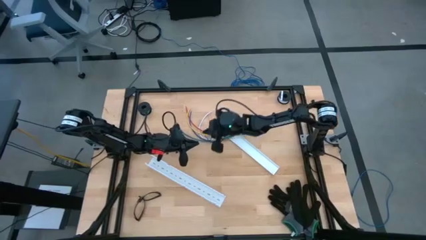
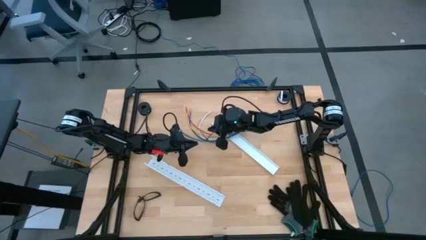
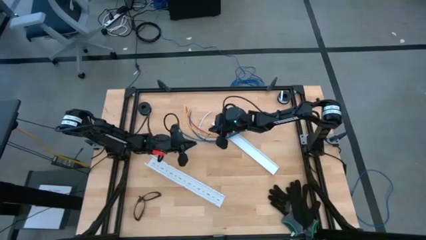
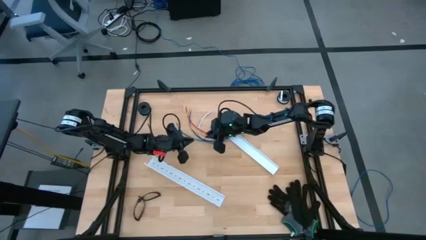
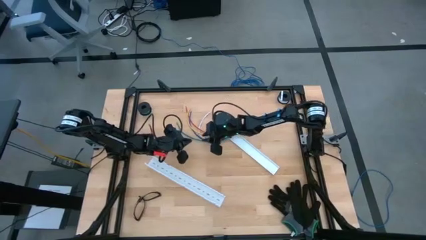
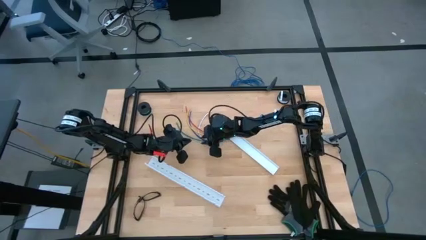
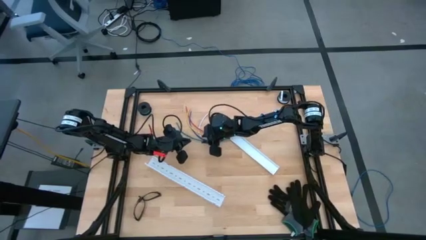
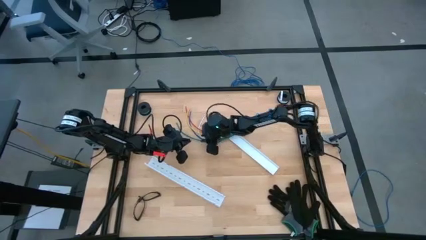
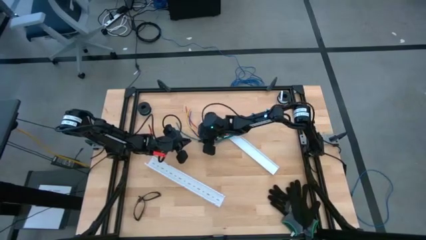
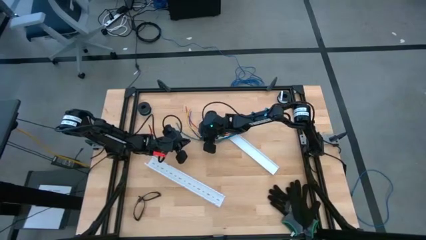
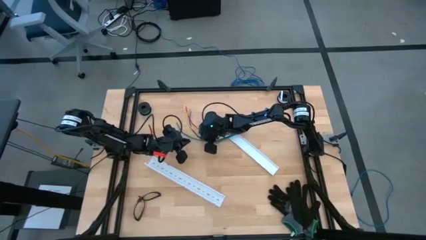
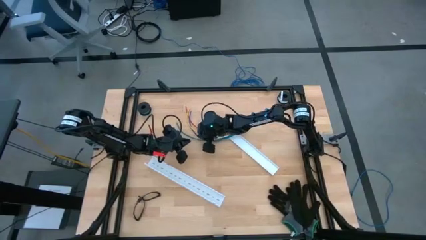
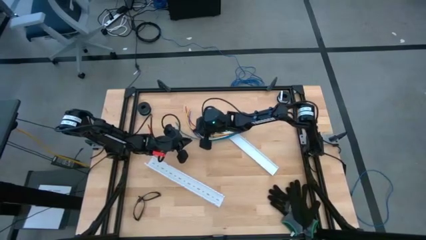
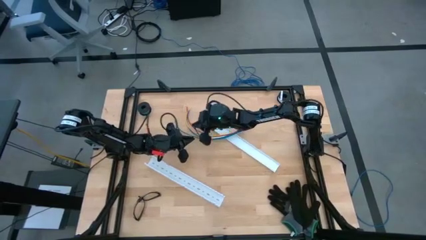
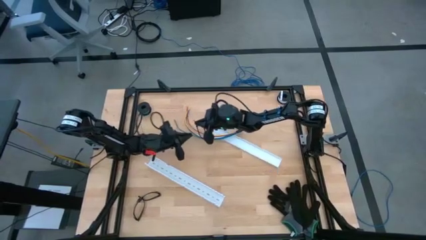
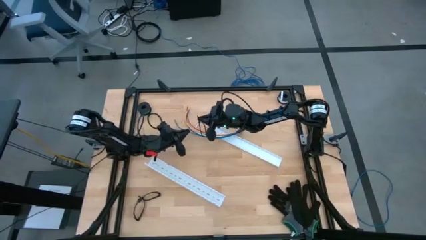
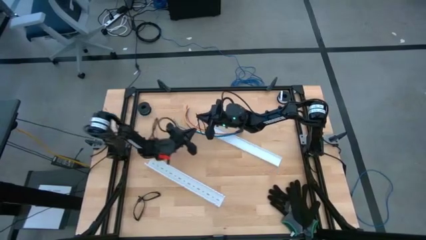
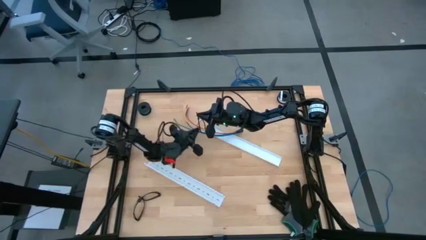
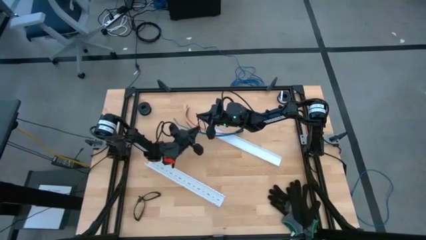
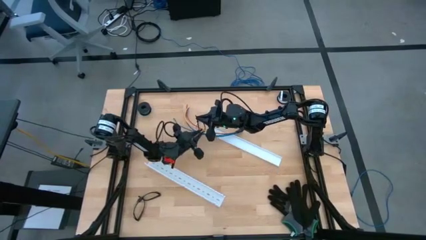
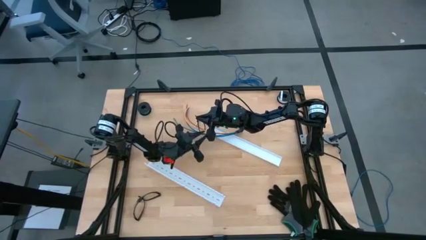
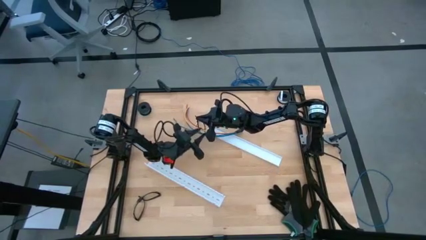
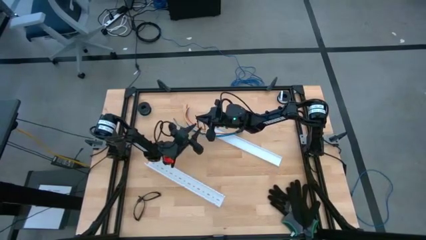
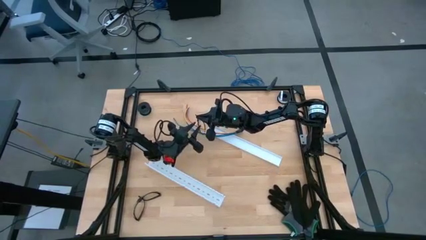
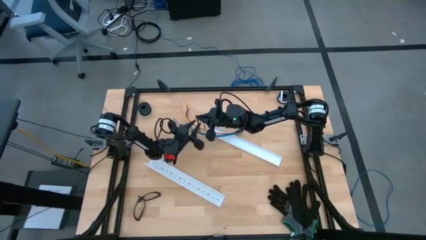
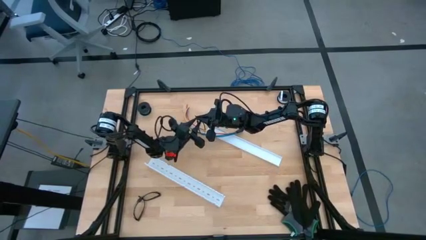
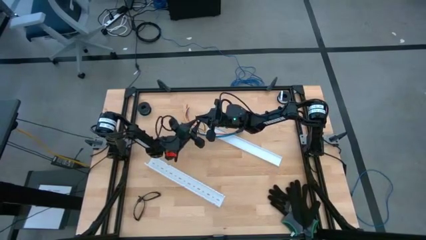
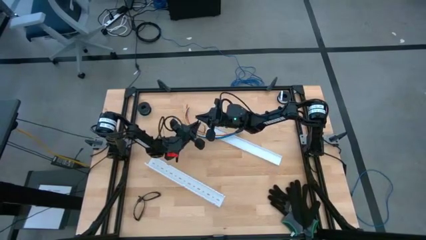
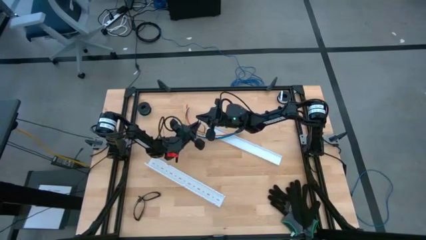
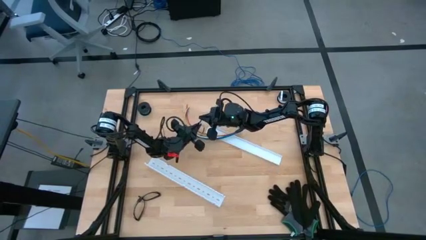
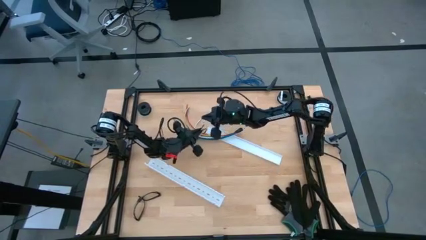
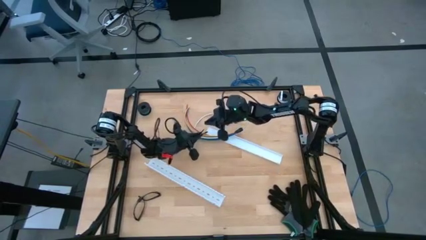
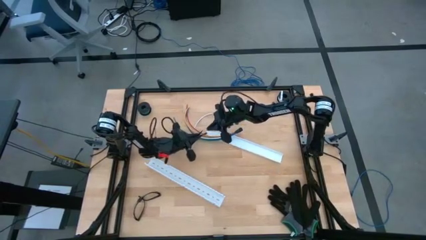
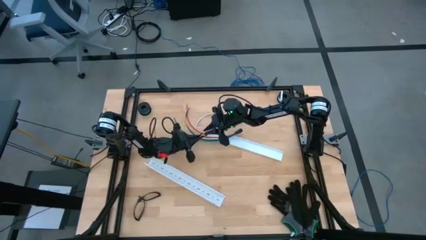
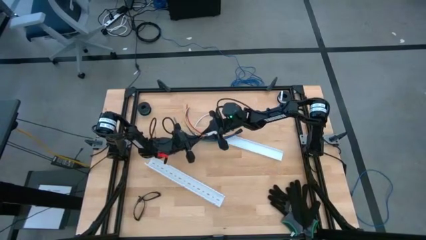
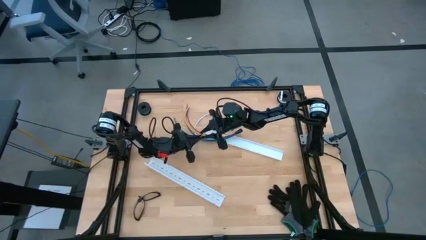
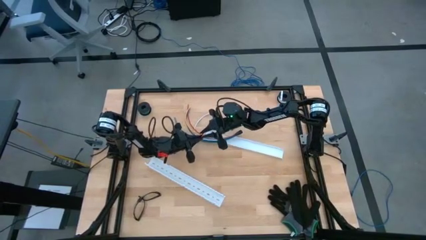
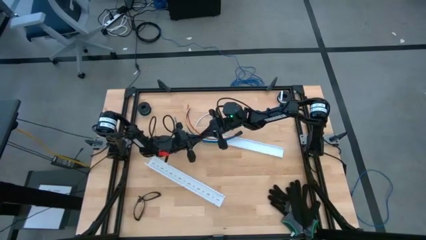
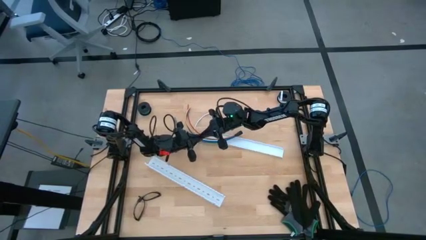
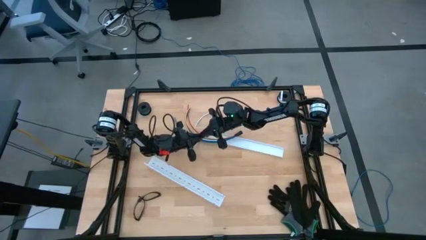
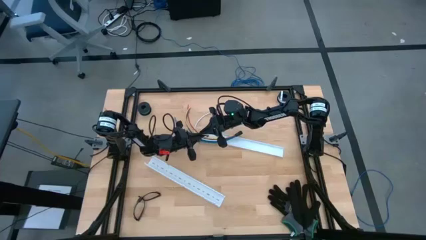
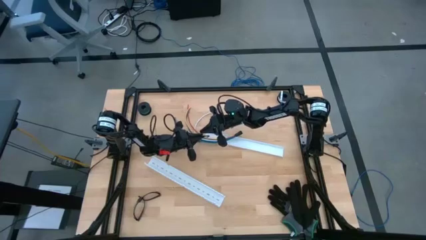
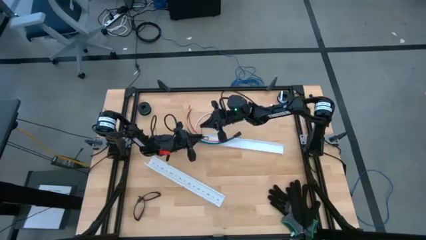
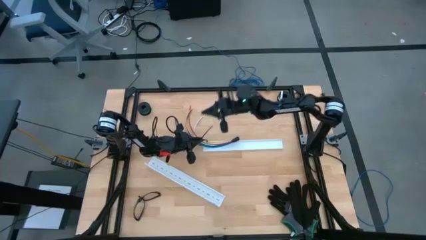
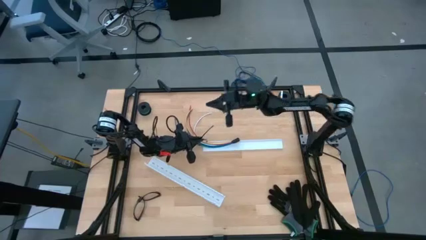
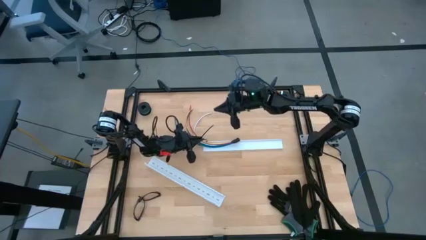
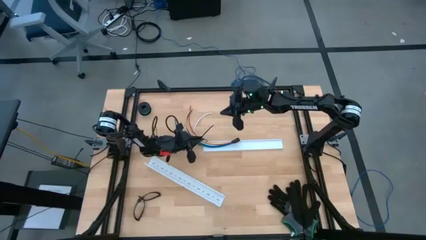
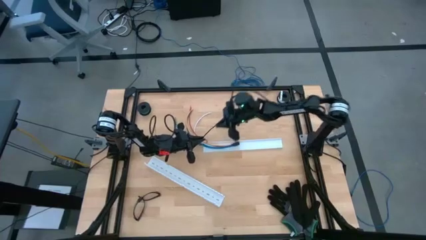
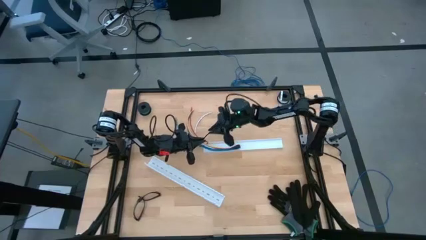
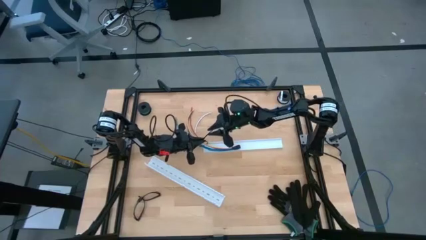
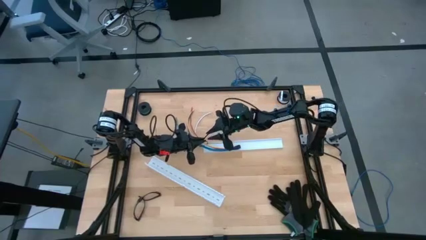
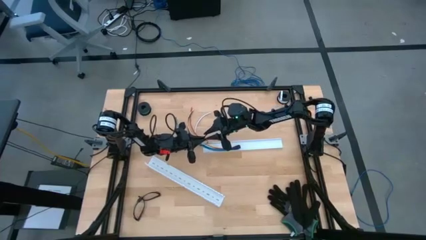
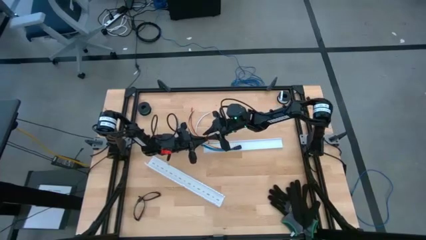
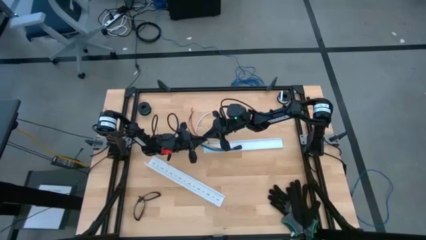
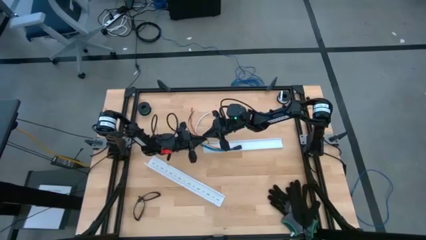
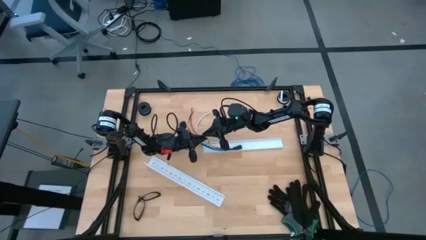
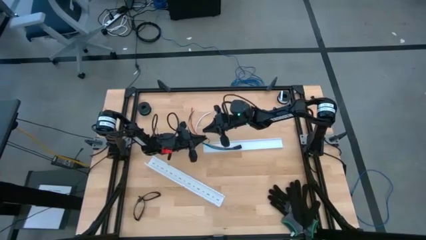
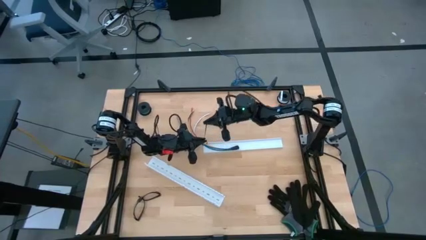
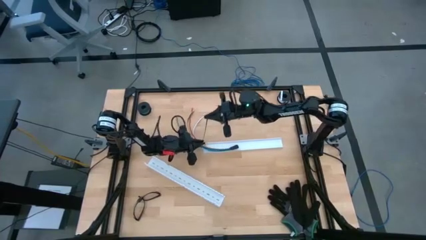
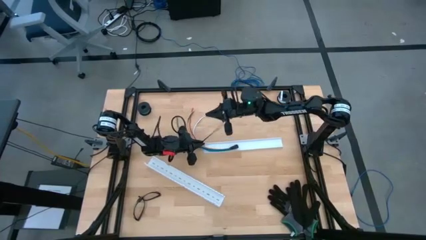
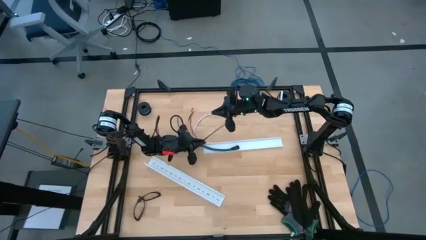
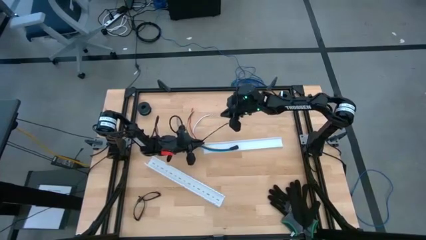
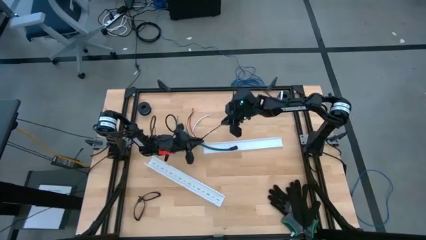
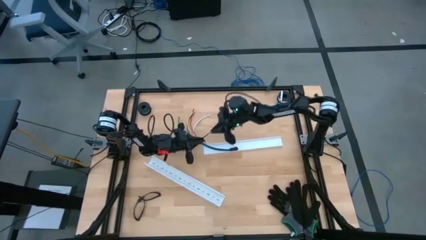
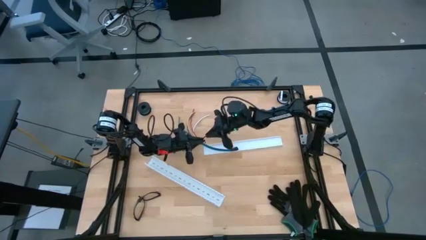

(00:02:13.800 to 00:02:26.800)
Task: Ziptie cables
Wrap the cable wire in the zip tie

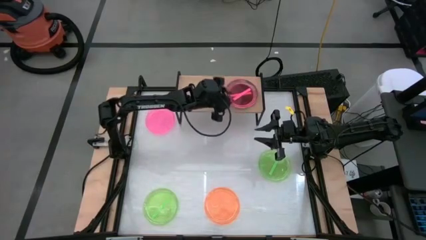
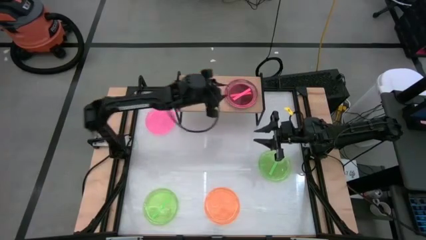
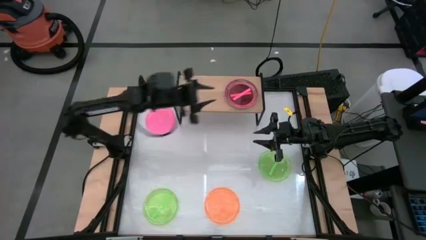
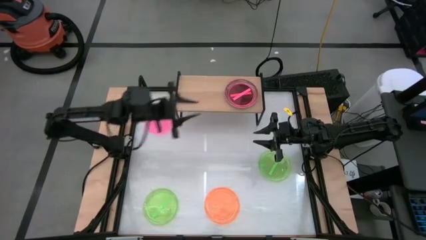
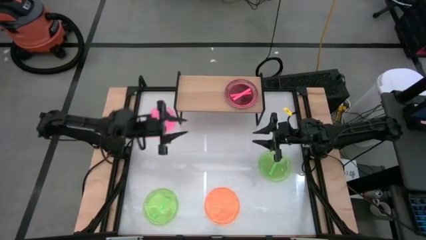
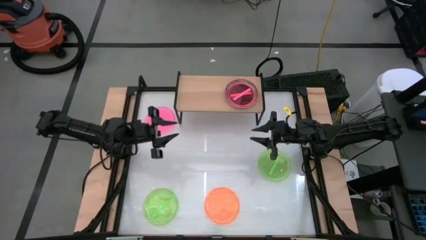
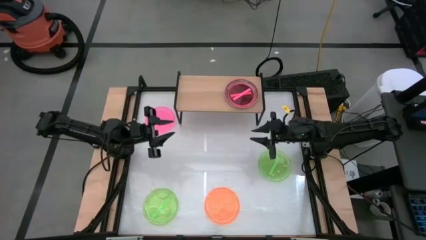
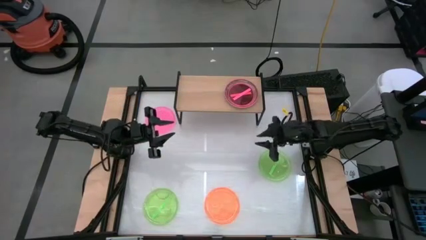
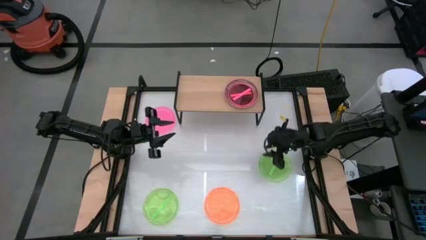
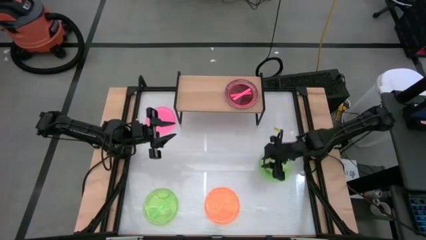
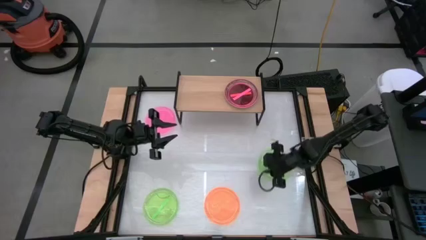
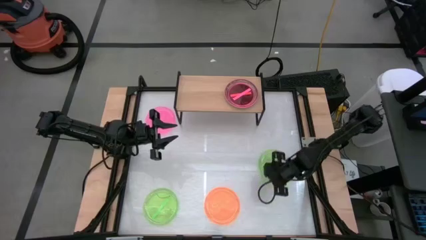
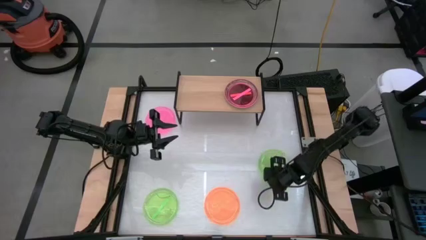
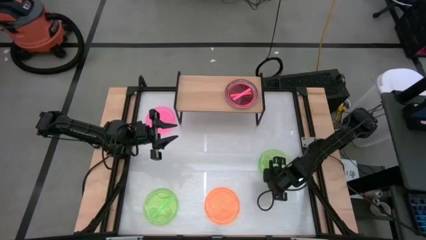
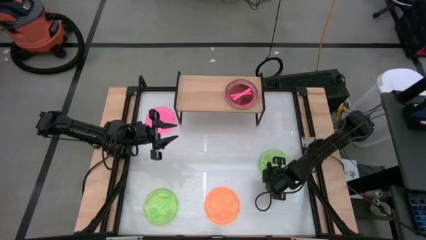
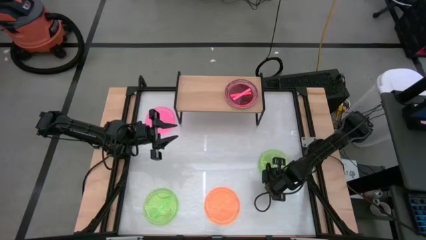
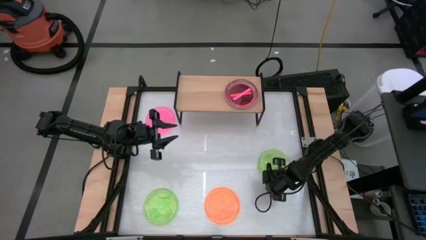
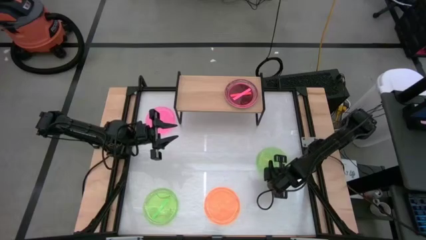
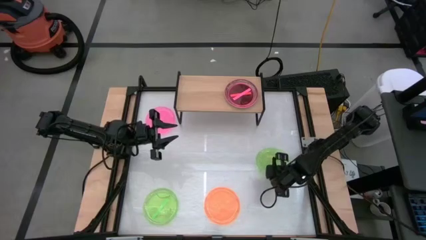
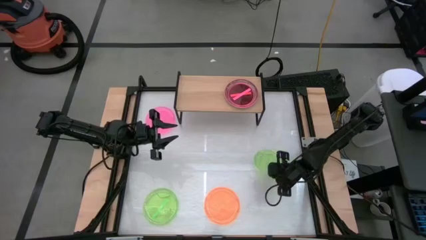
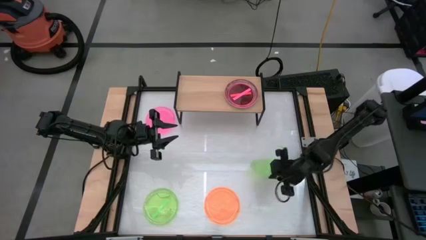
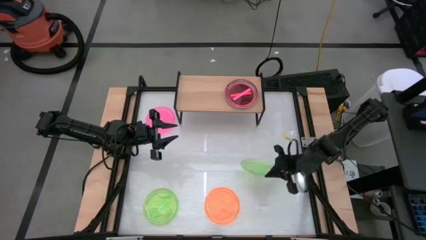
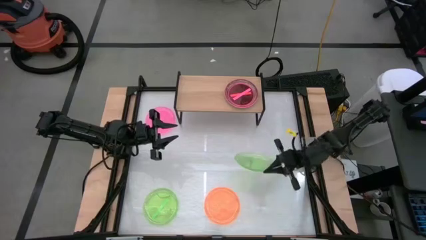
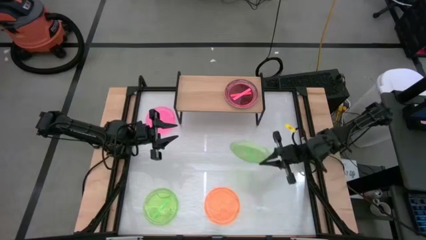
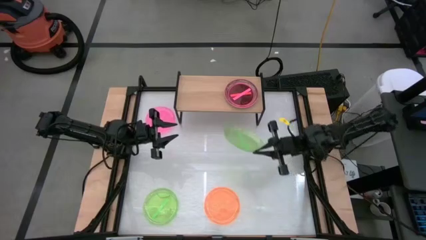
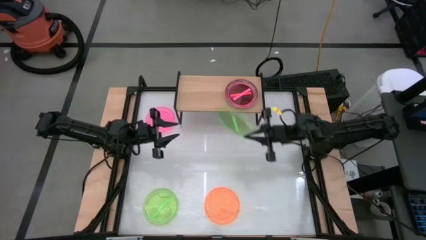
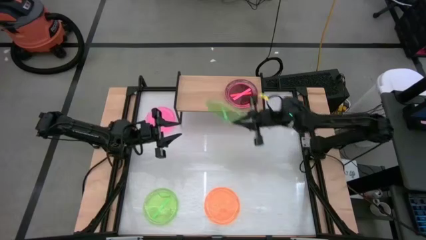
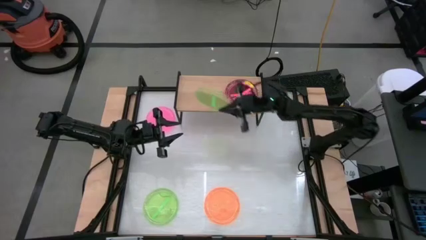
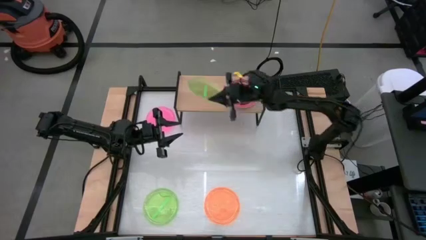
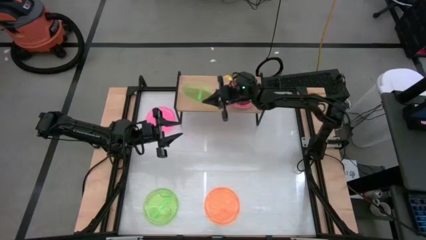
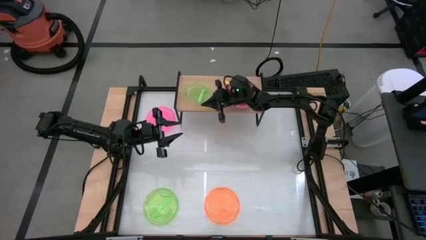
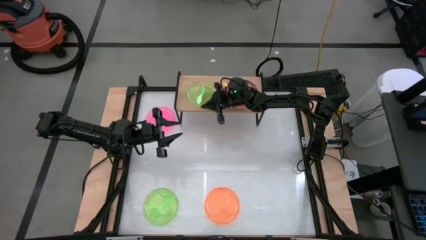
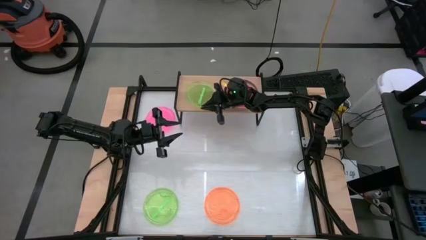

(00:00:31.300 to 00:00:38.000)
Task: Place and stack plates onto a shelf
Put the right green plate on the shelf
